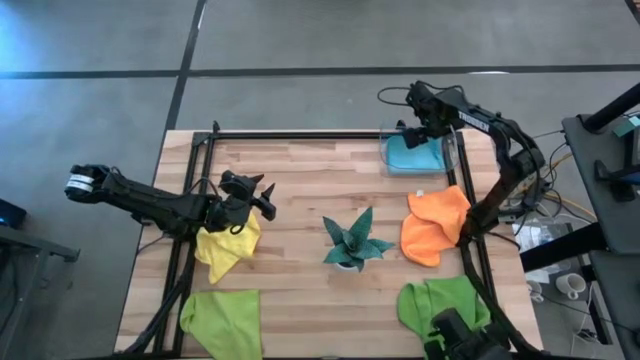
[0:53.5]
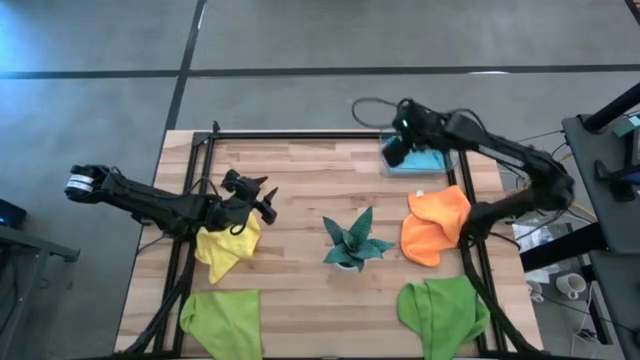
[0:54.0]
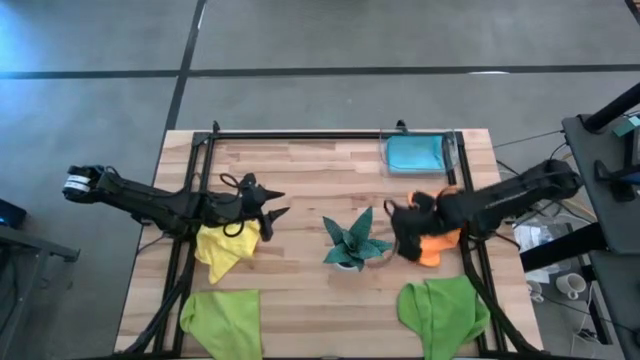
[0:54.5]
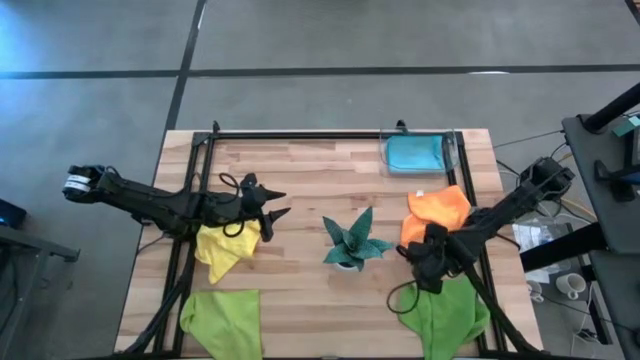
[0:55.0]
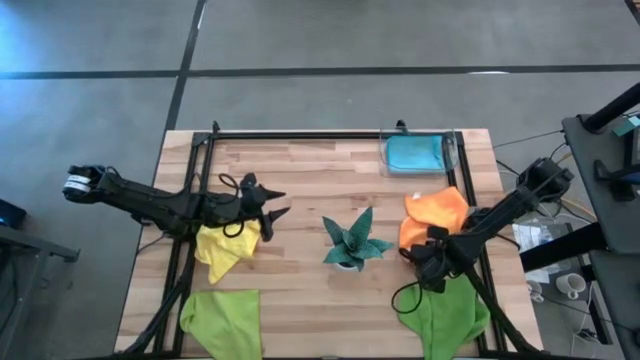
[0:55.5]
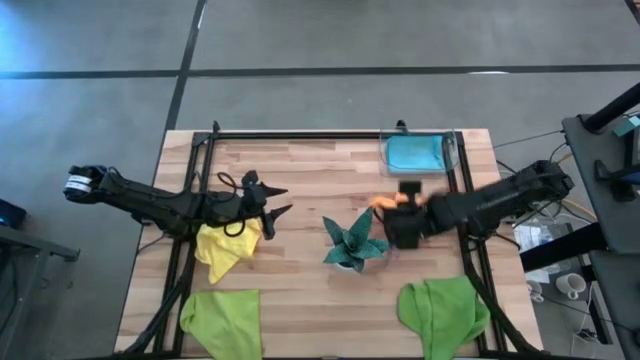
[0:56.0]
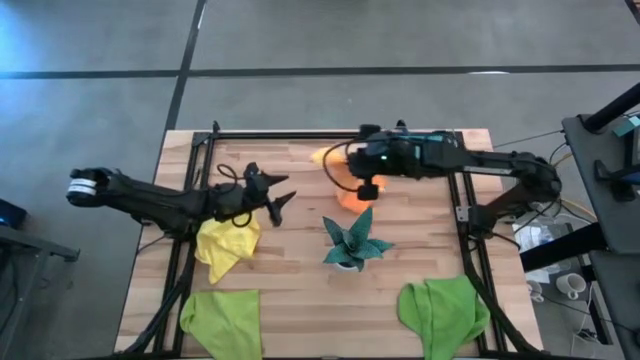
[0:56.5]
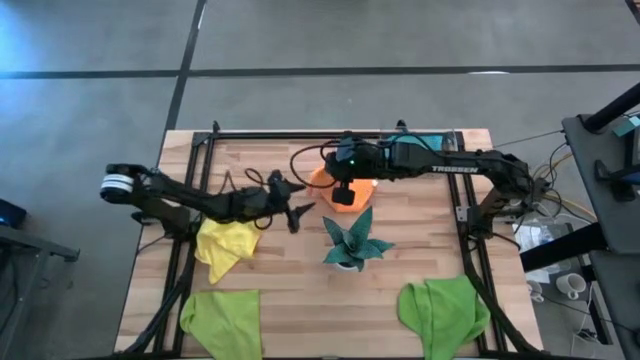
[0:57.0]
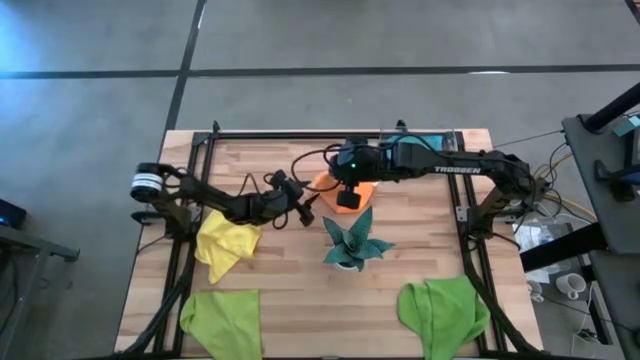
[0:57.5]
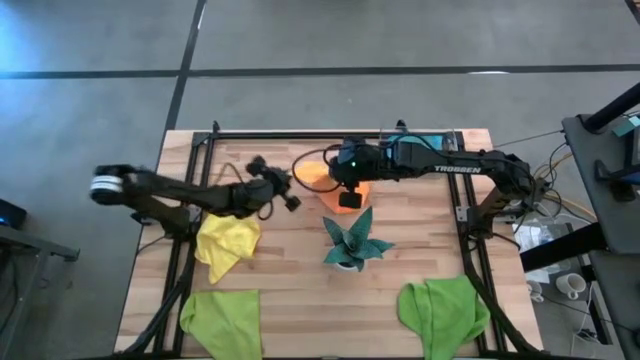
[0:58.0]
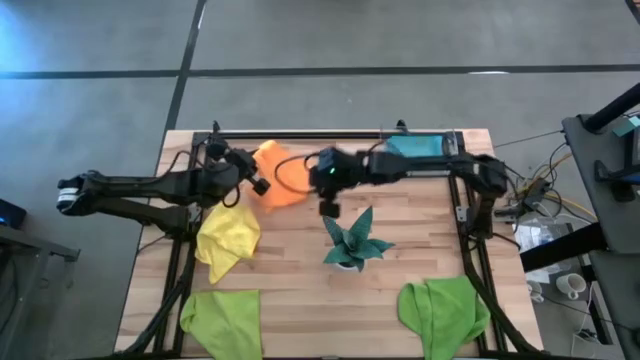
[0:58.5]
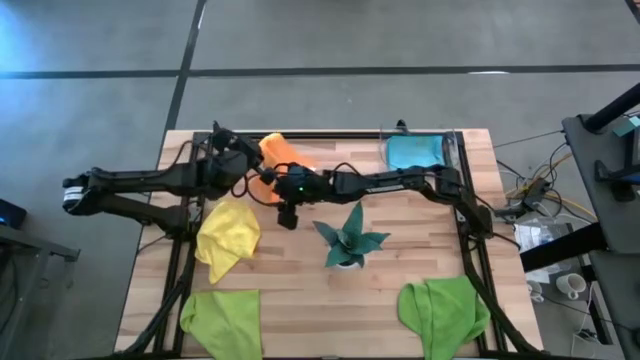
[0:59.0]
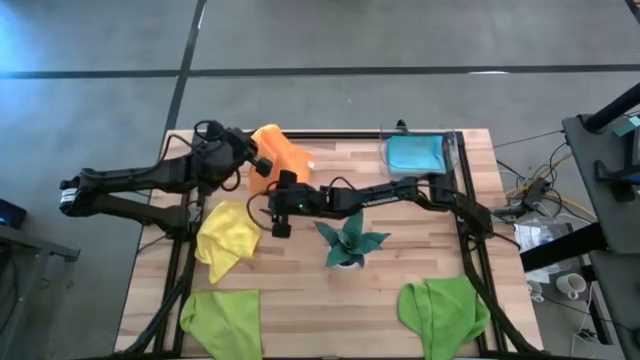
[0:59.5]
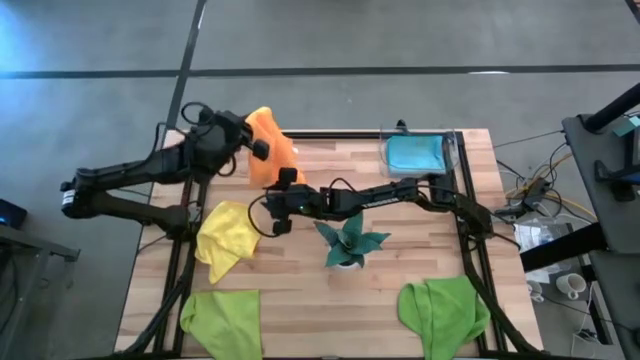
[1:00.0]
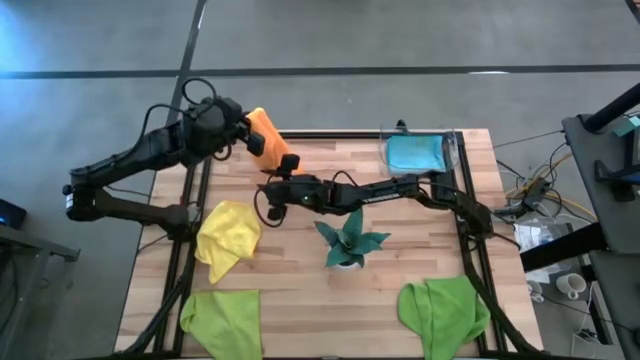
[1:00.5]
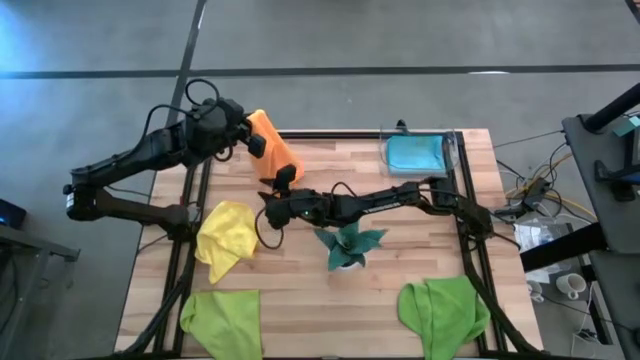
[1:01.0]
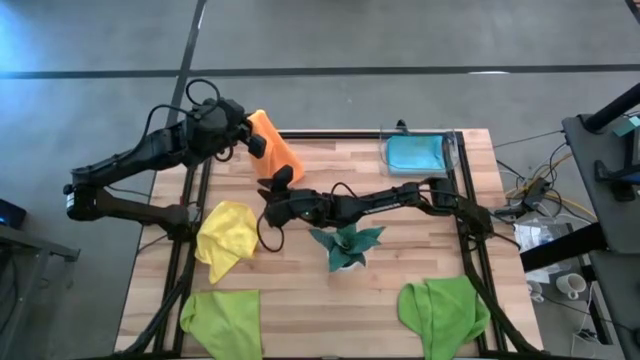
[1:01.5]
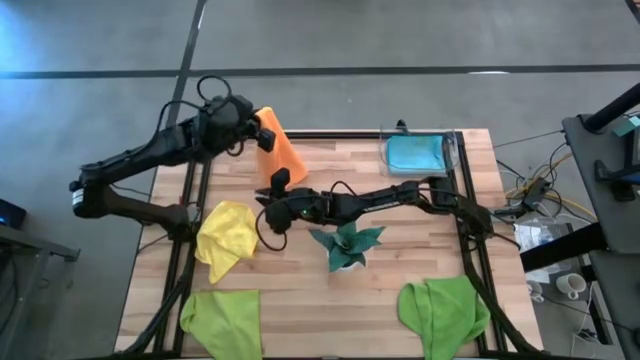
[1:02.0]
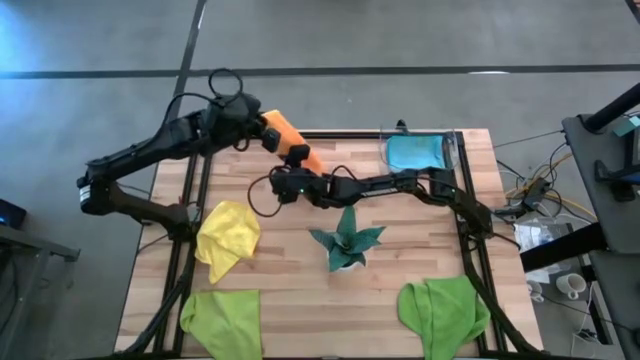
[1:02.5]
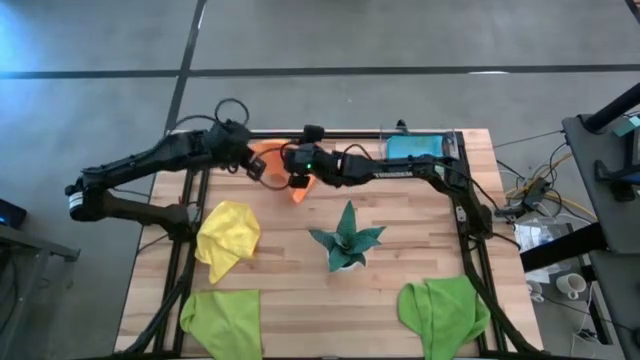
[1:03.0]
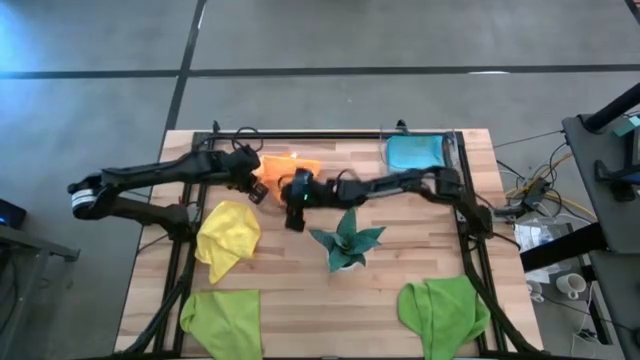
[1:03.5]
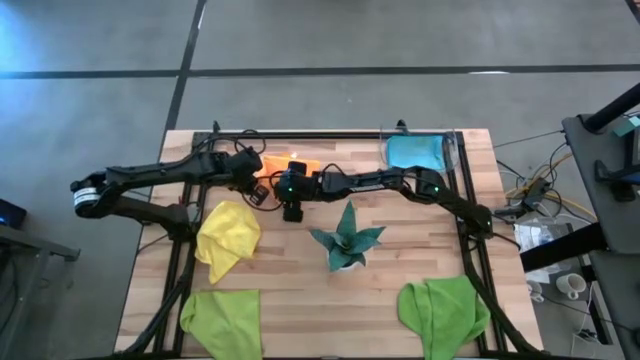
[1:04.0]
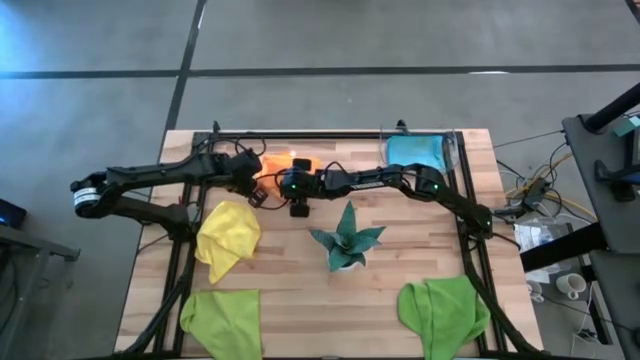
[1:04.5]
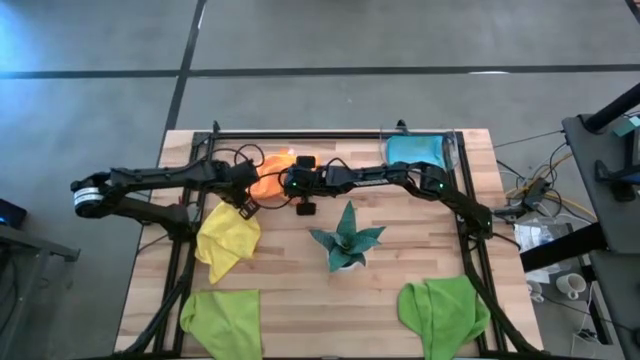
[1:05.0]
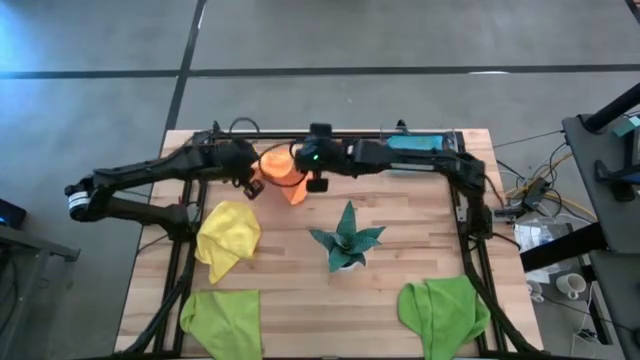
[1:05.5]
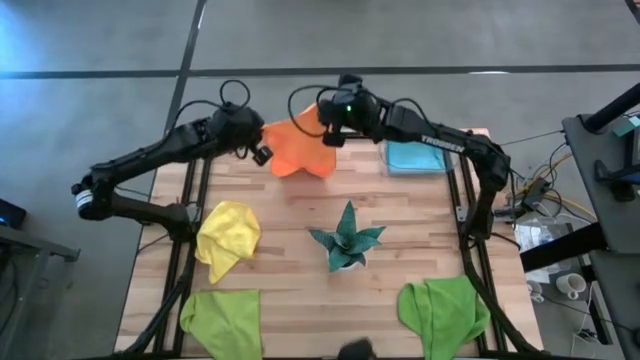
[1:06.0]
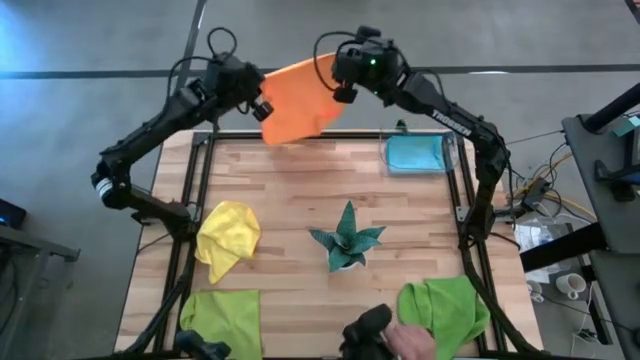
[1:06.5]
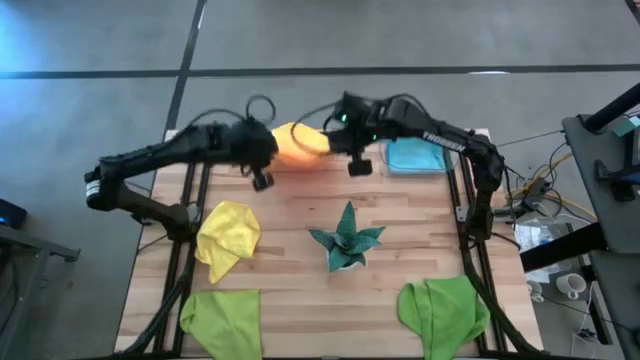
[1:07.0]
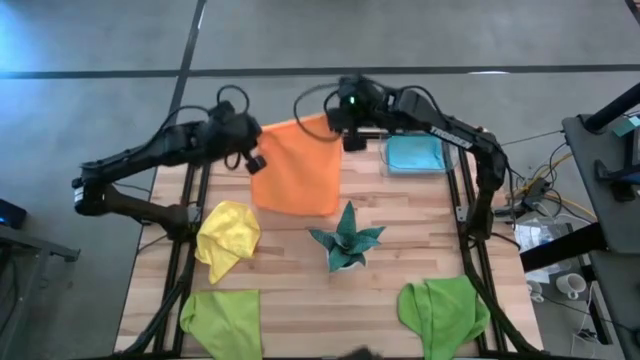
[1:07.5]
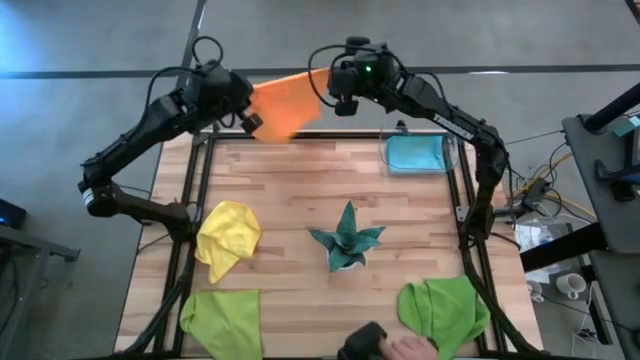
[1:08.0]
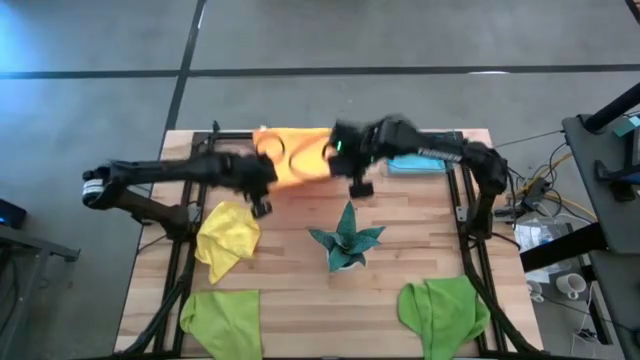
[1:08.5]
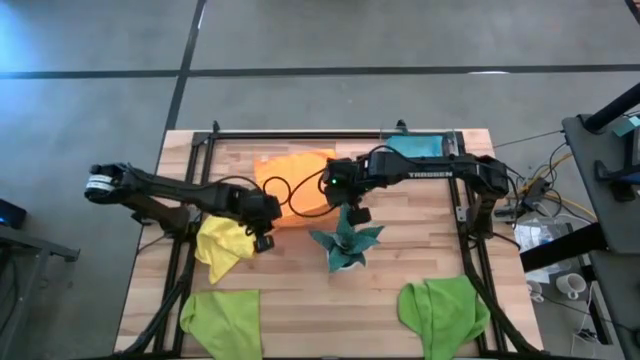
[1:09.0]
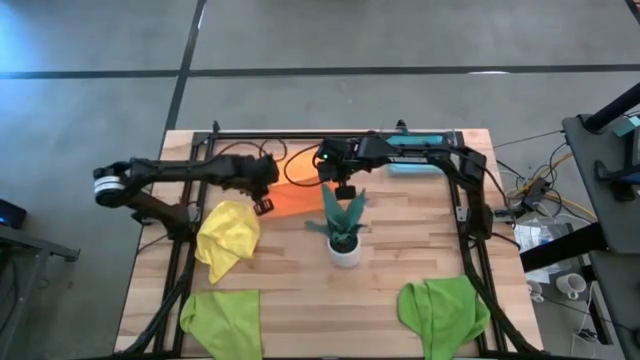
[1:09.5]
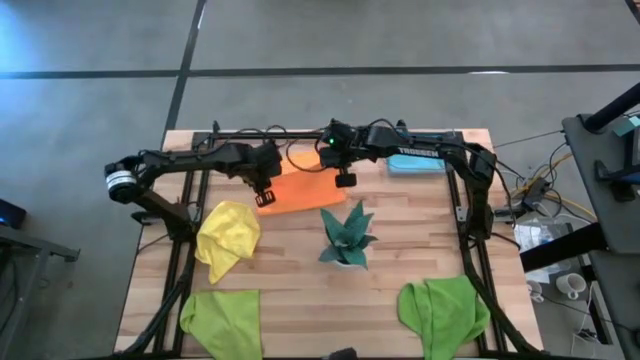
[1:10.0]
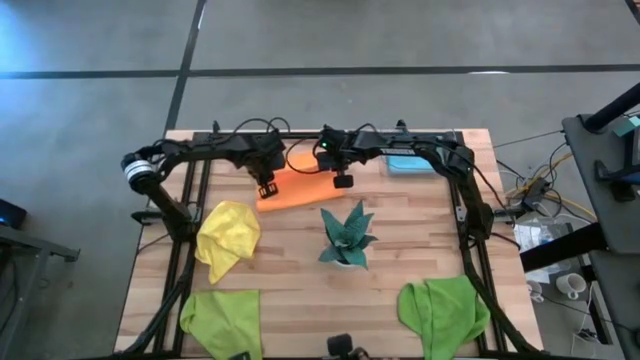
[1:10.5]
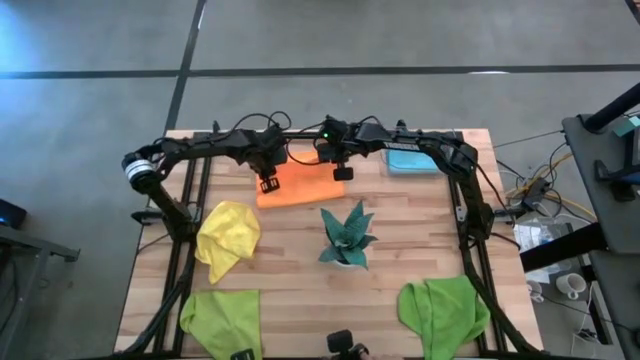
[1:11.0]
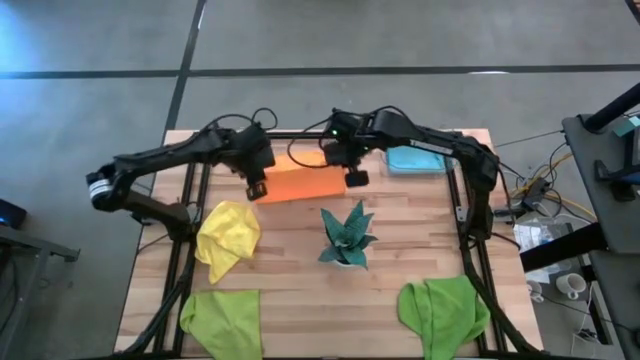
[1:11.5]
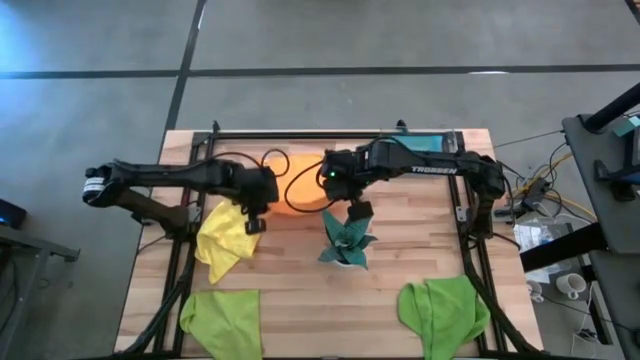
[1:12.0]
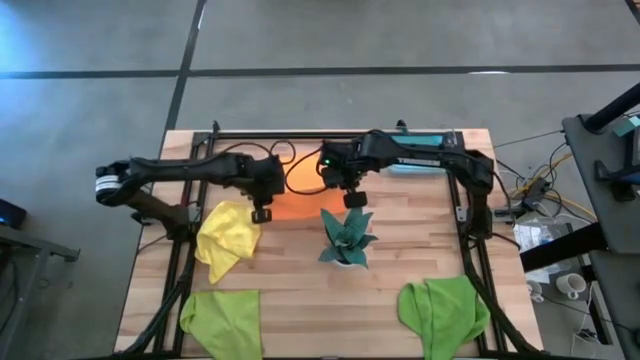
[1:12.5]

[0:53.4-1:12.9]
Task: Fold microfiber towels
Fold the orange microfiber cloth

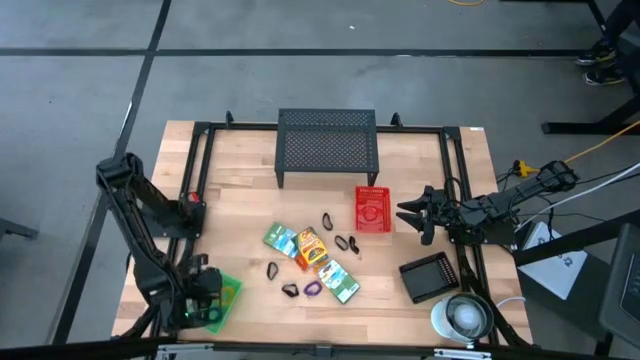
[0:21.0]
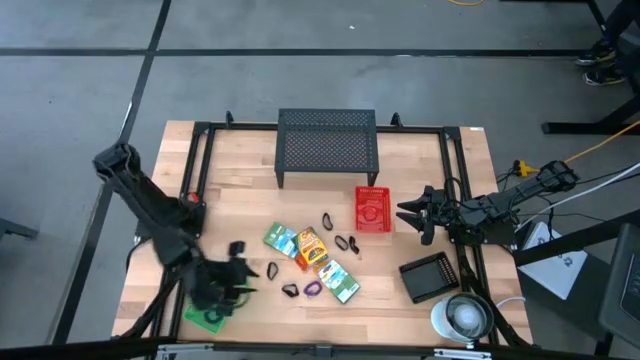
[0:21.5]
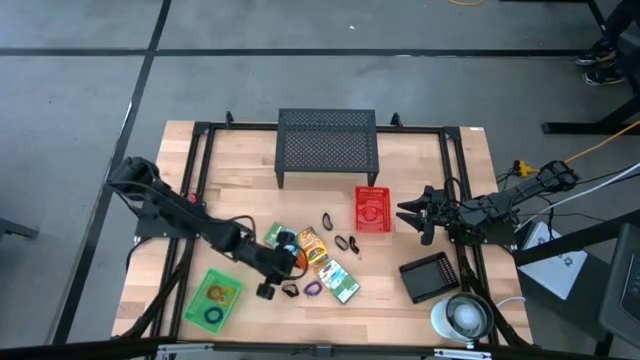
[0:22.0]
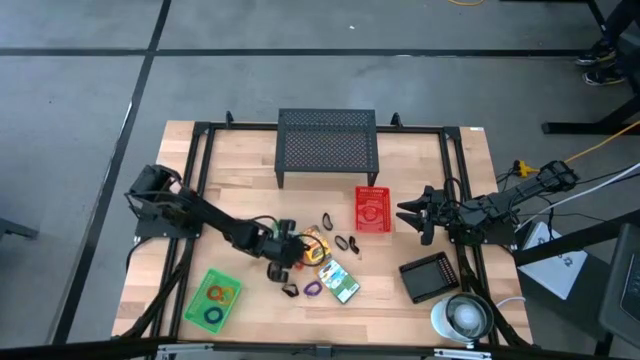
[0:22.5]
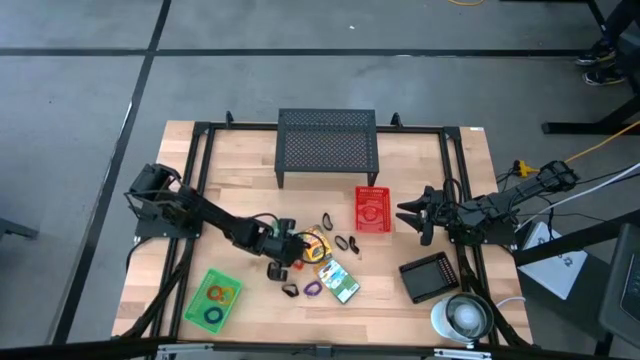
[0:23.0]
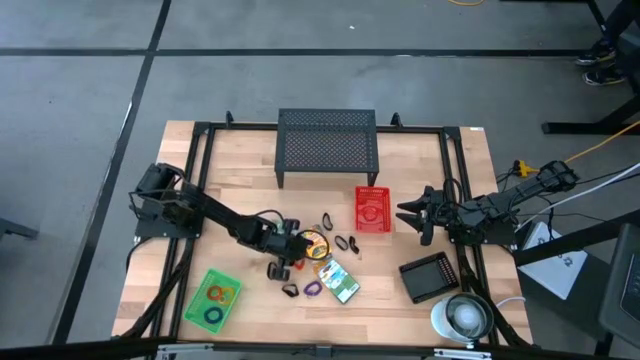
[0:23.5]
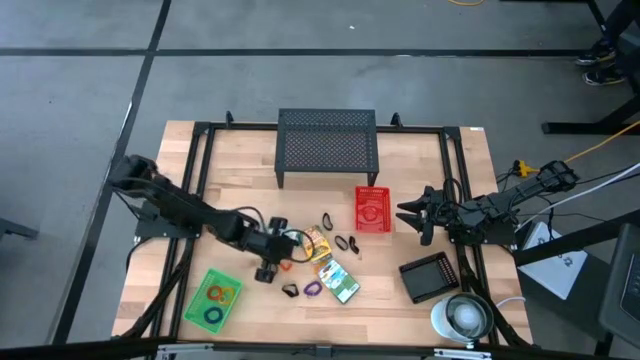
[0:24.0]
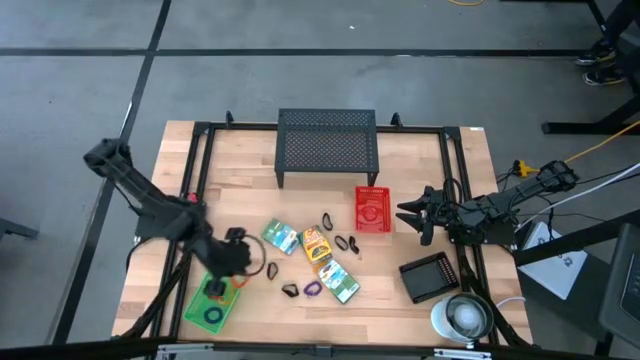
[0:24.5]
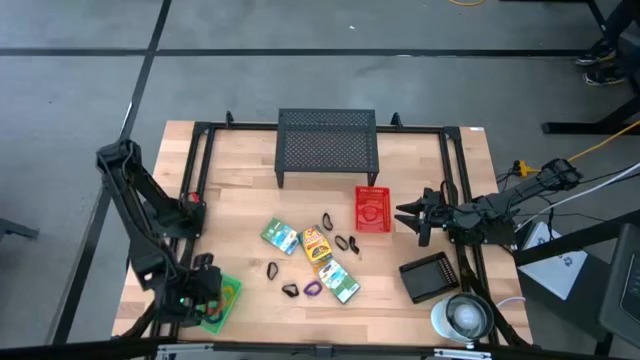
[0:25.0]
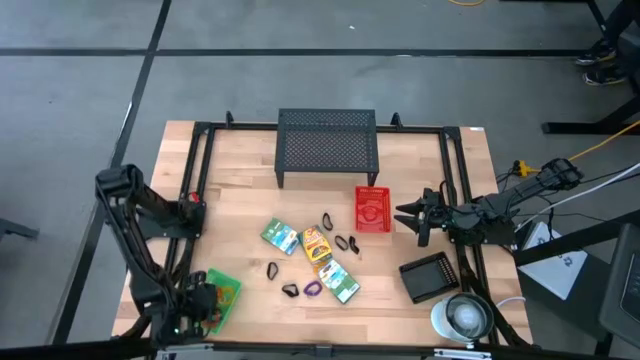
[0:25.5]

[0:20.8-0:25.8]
Task: Pick & Place Office Desk Supplies
Put the orange spring keychain into the green bin
